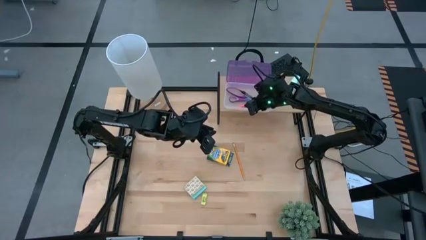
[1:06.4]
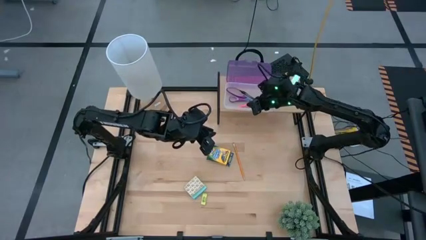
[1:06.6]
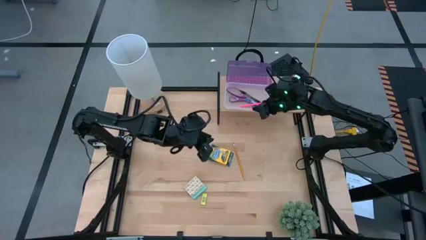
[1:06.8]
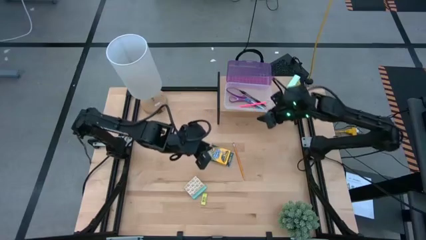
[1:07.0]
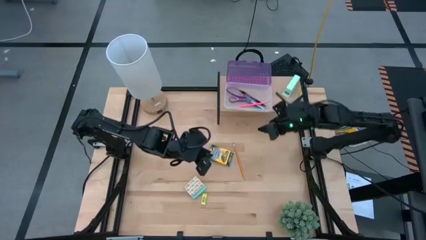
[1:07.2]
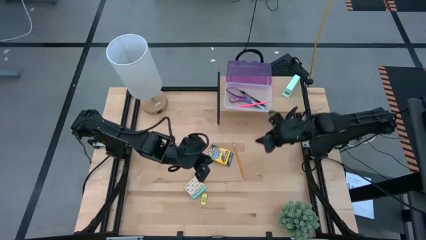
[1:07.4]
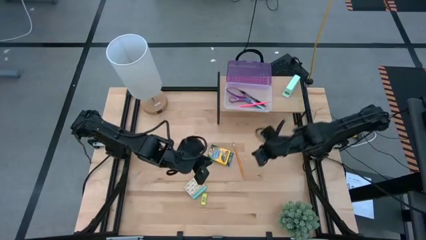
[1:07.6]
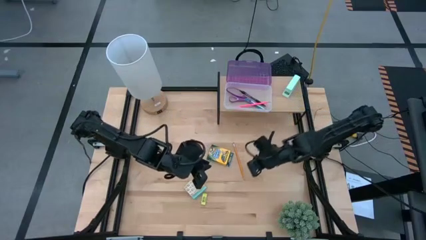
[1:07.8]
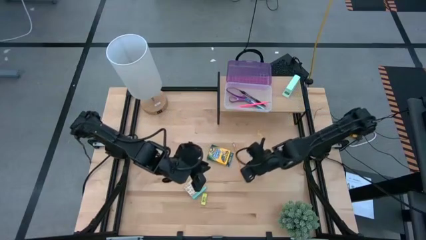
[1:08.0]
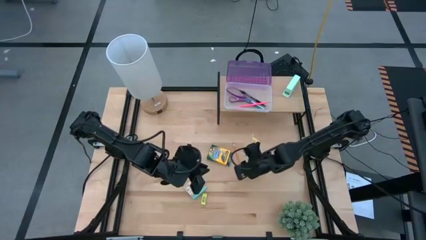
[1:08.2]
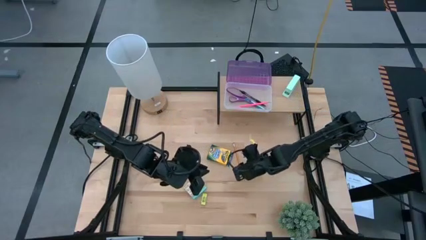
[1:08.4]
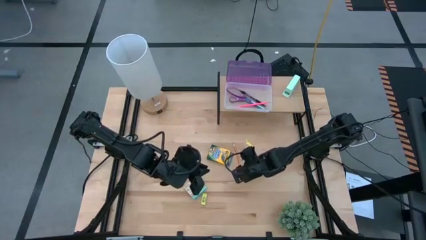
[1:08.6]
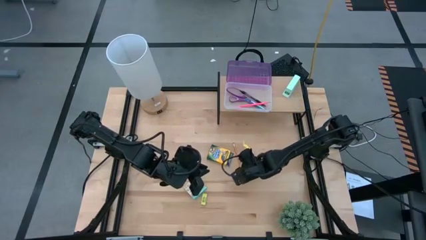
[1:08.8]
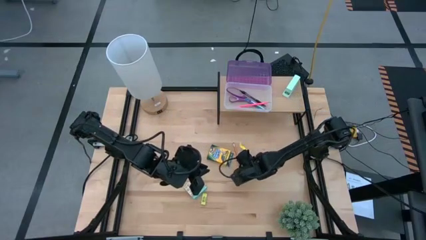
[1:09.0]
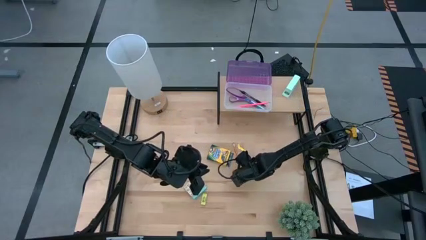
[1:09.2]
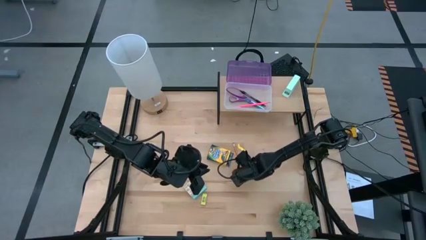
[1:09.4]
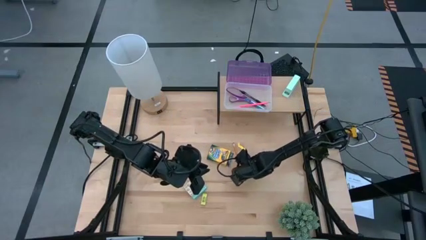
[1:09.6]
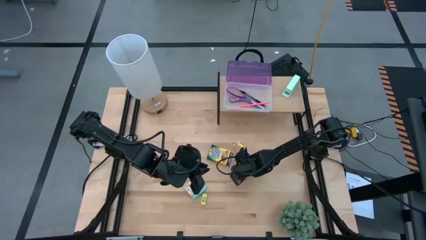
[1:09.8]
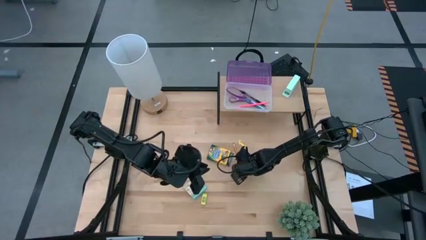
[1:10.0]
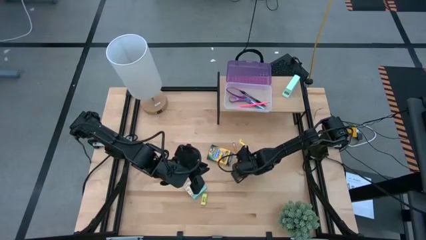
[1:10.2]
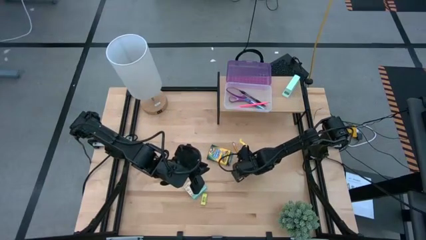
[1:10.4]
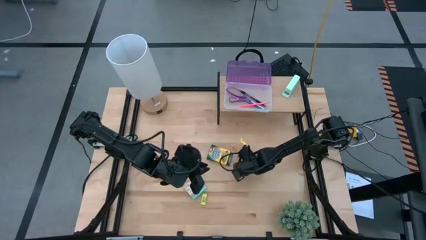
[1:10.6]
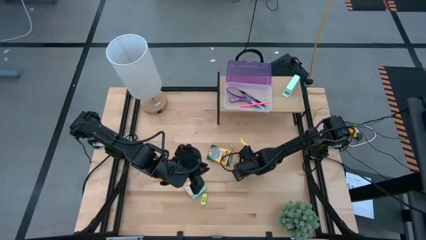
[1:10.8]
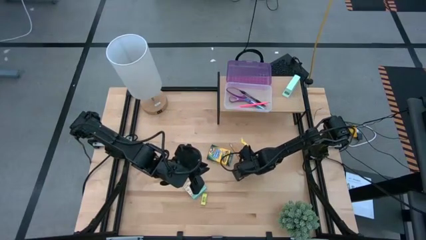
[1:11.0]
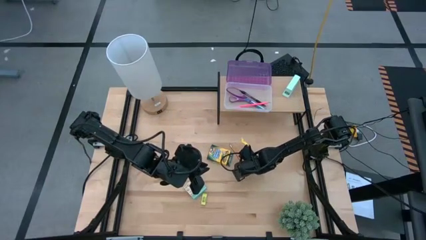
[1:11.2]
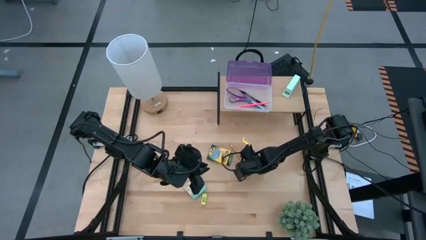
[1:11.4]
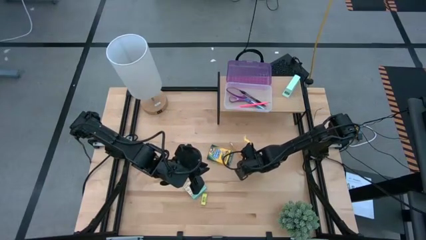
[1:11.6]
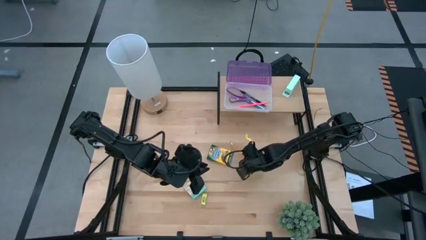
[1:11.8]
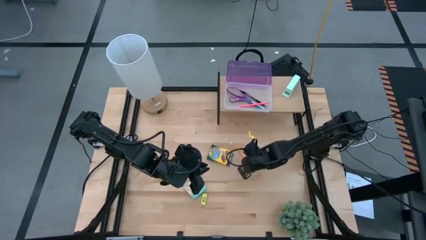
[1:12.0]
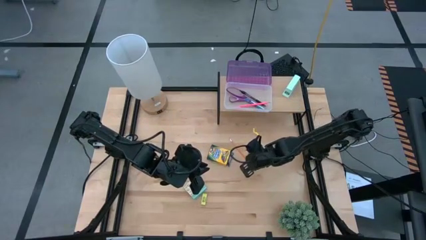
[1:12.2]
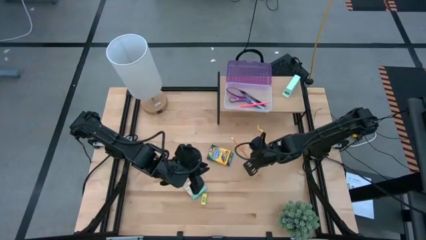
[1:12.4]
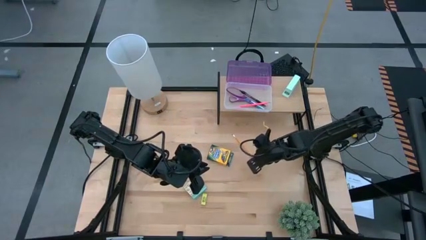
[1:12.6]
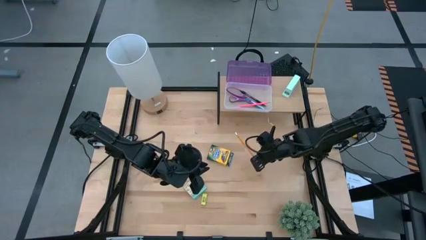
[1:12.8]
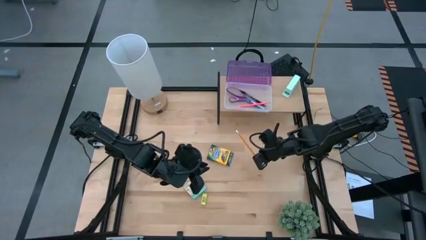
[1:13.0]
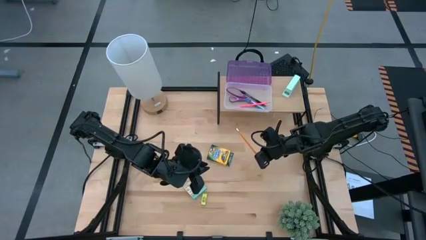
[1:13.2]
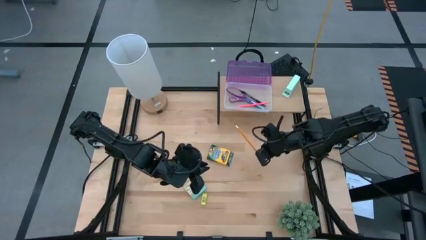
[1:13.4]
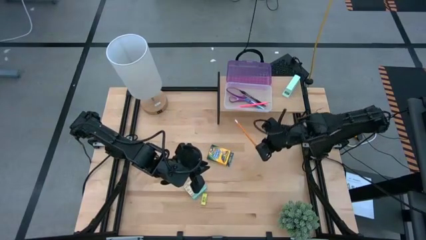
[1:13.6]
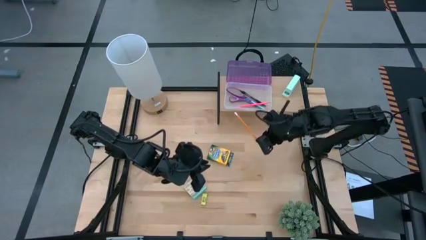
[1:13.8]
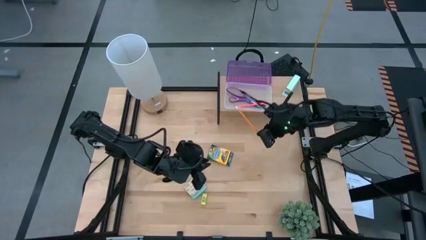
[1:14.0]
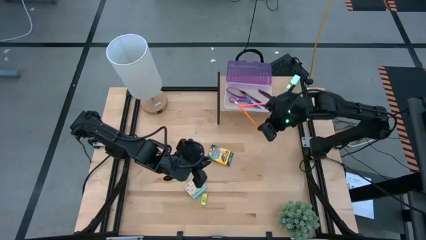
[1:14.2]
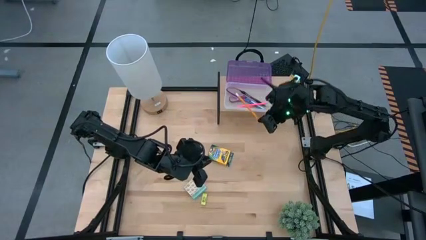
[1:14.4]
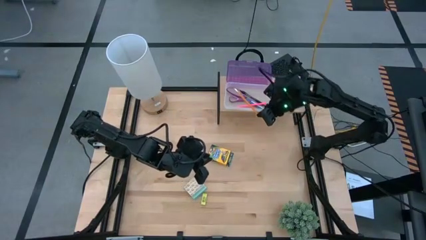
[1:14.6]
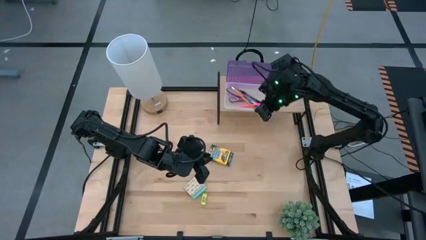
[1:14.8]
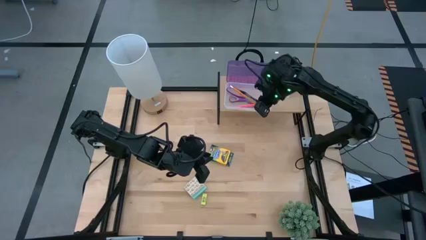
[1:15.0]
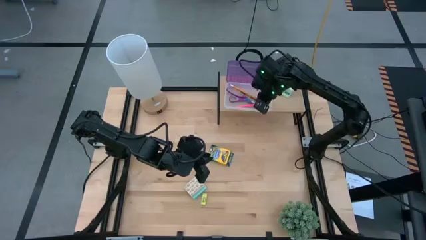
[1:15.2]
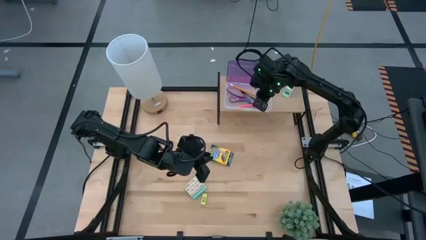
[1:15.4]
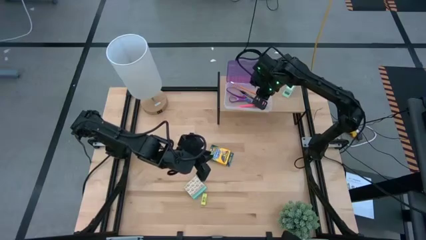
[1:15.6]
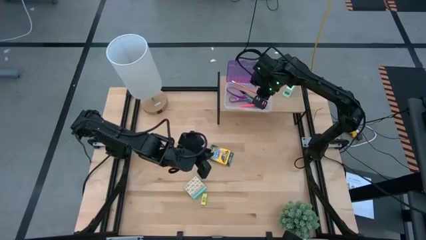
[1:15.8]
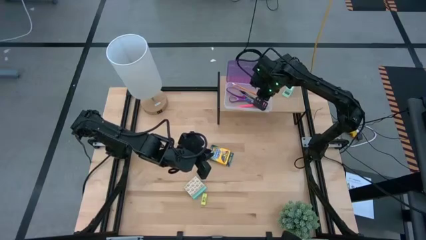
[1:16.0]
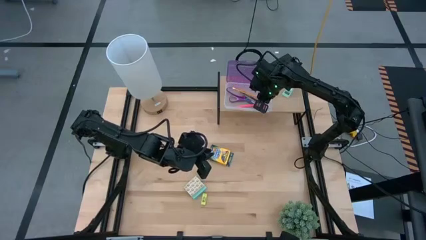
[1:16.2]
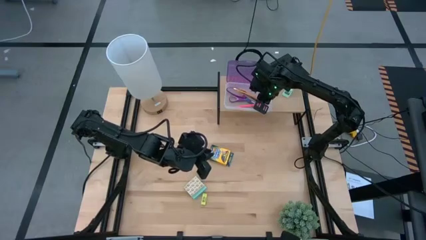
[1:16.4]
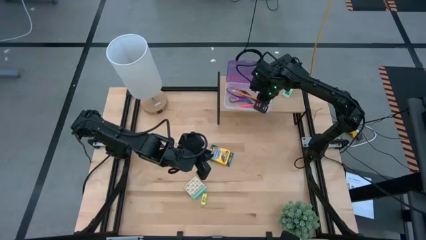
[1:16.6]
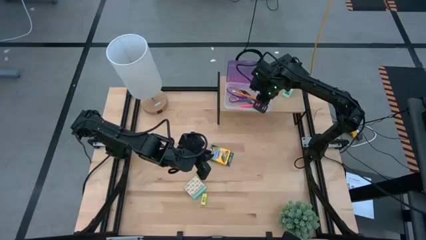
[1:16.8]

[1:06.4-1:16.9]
Task: Pick & place school supplies into a supply box
Put the yellow pencil into the purple supply box on the shelf

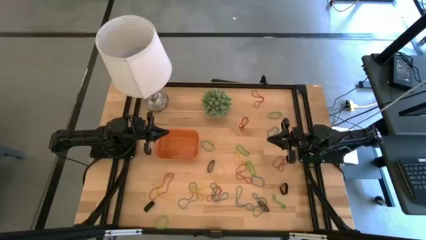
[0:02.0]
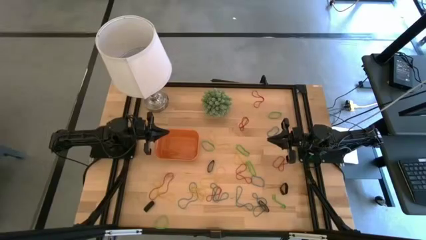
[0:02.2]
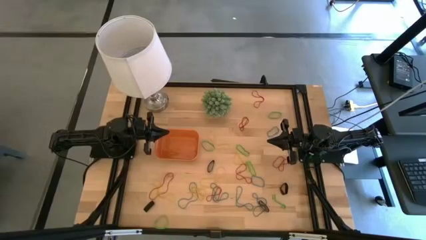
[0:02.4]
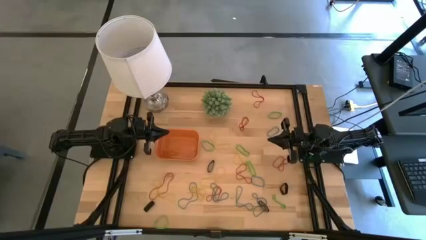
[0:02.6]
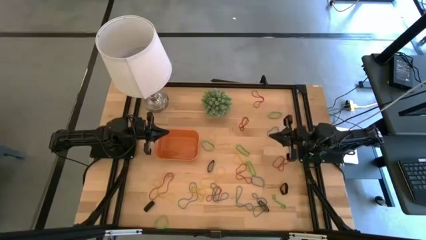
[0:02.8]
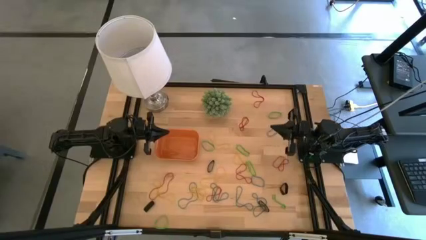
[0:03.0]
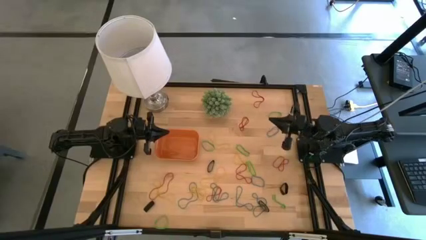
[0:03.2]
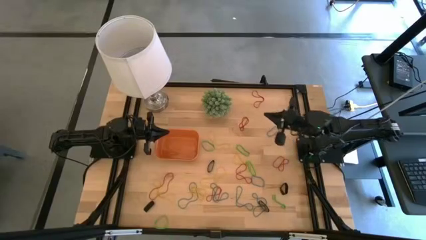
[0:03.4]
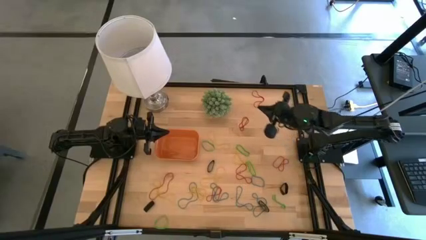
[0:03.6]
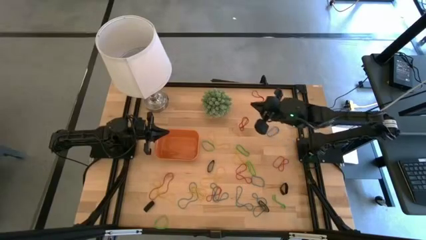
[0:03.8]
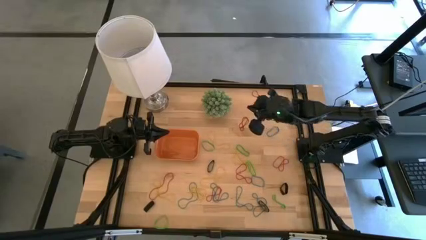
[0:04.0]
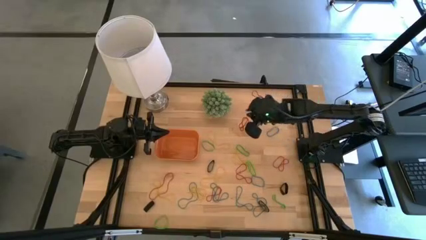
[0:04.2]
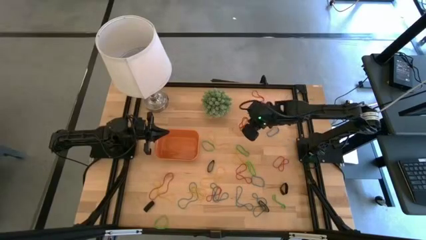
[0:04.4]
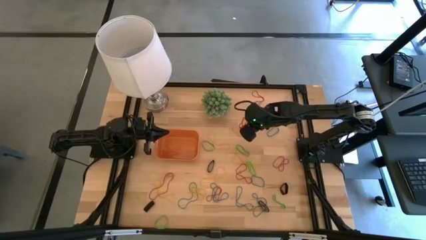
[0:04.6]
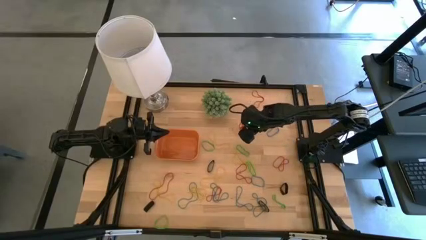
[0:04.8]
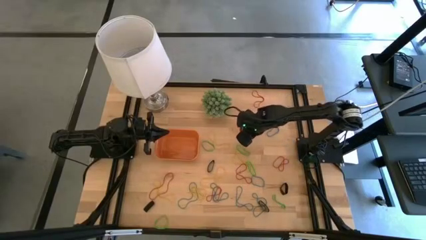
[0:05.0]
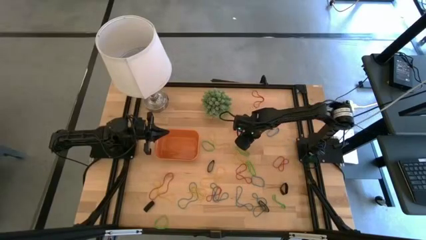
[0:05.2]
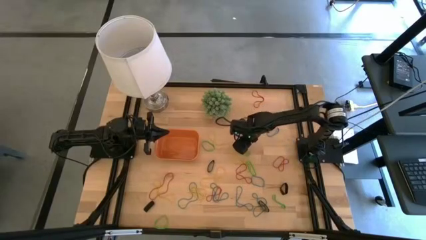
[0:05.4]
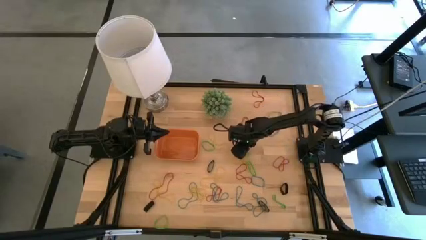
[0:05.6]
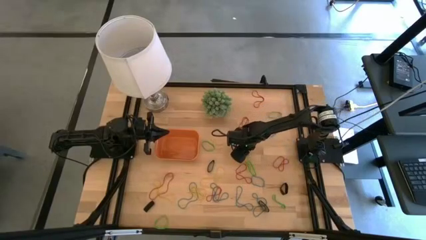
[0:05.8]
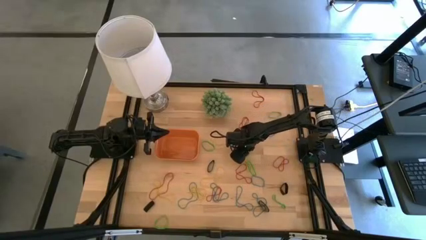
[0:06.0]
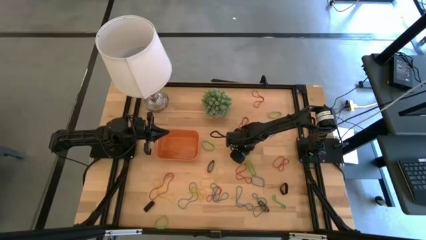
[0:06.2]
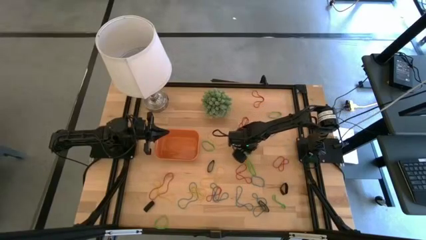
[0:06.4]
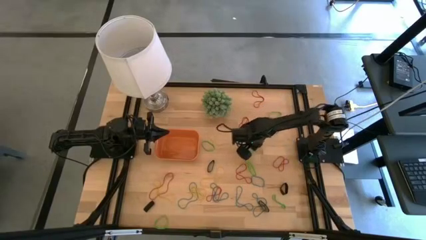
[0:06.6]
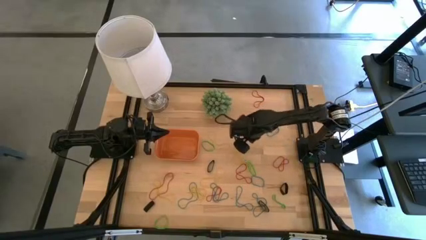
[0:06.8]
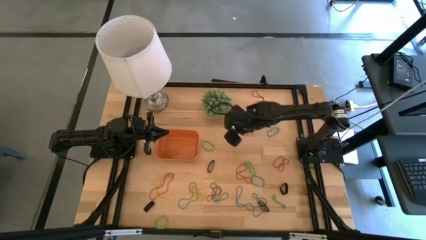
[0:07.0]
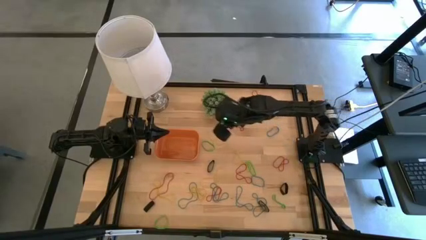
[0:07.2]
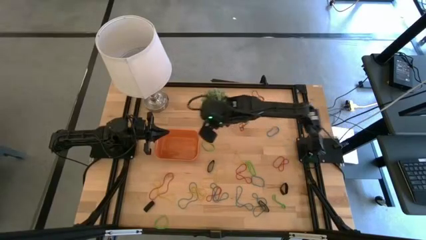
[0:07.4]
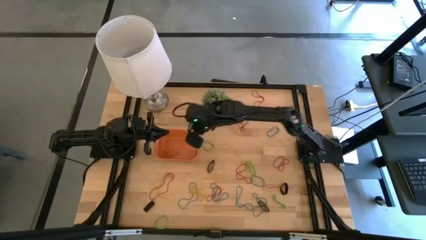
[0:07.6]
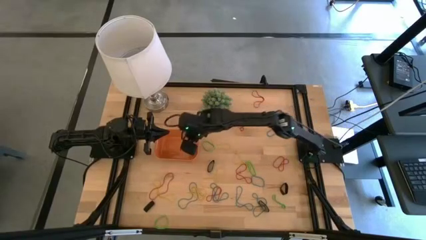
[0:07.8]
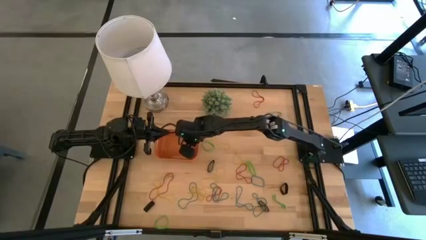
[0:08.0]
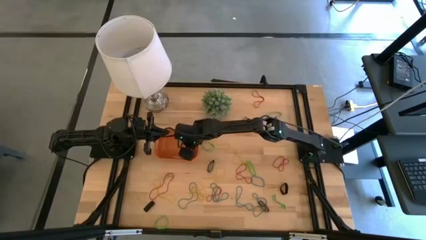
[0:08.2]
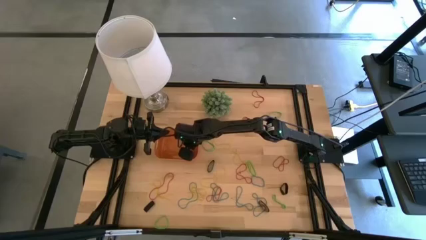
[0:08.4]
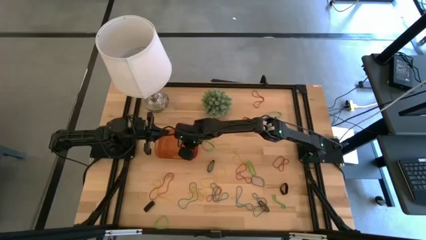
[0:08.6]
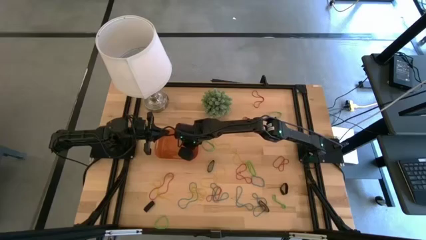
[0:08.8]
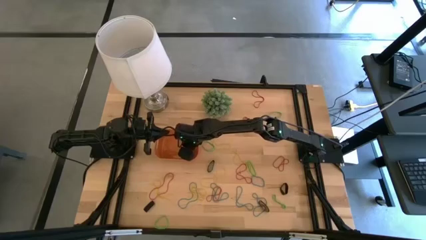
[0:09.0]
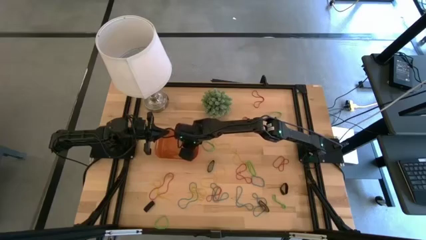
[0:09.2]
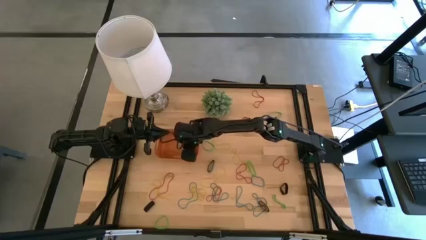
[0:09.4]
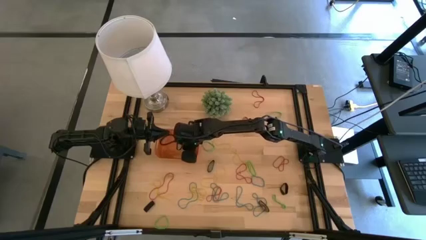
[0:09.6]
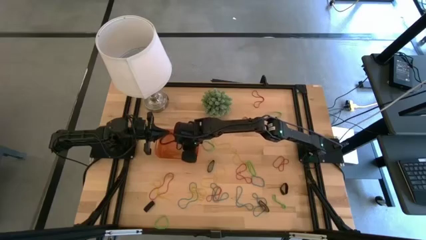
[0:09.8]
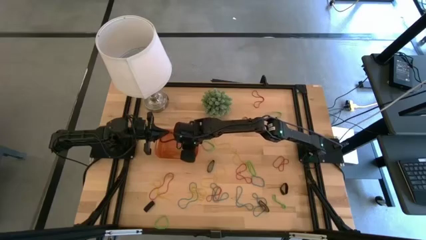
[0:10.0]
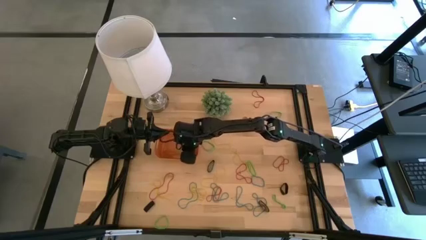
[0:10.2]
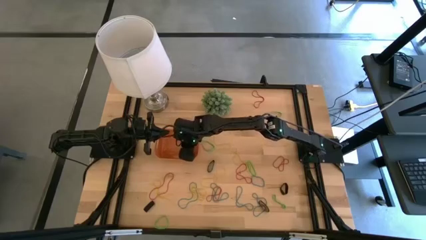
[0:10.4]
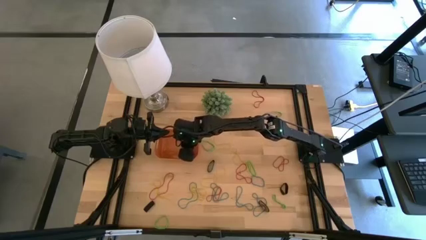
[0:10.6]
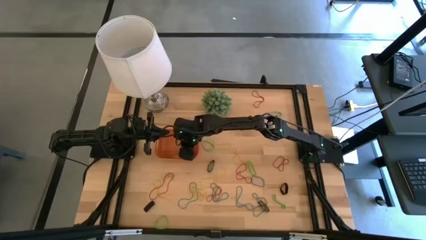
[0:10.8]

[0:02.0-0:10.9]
Task: Pick and place rubber bands into bin
Put the green rubber band into the orange bin
